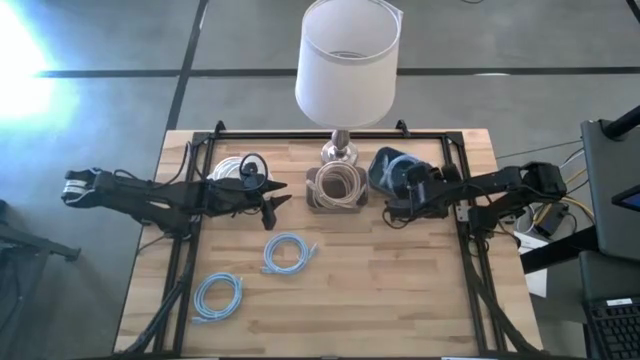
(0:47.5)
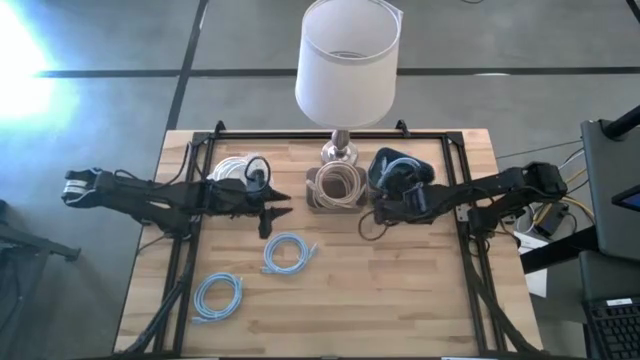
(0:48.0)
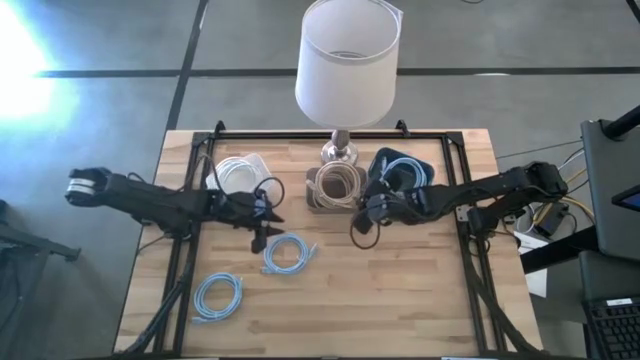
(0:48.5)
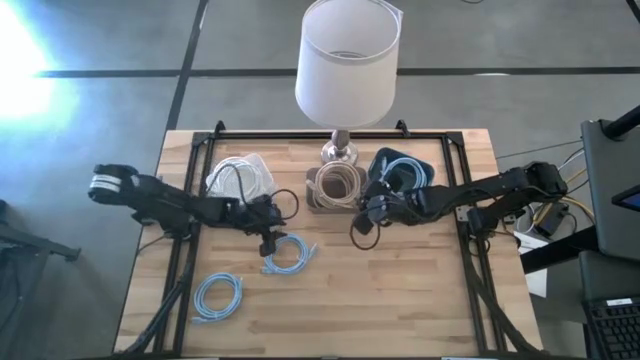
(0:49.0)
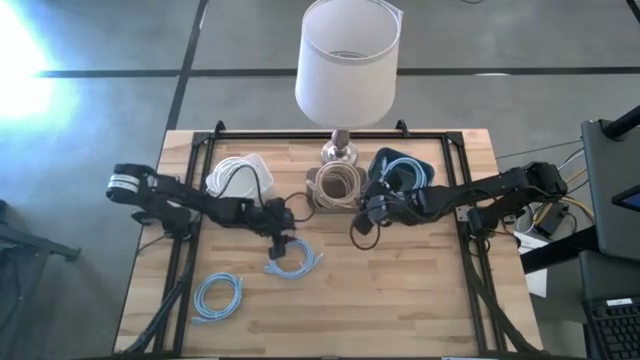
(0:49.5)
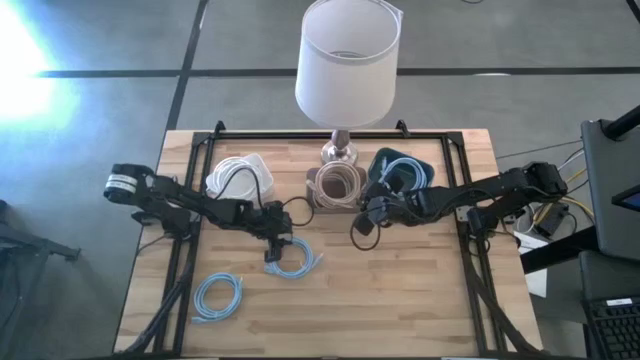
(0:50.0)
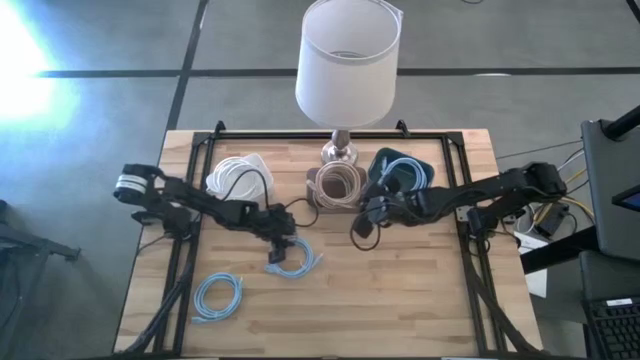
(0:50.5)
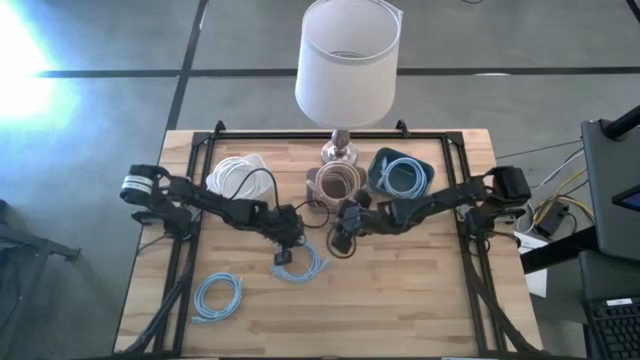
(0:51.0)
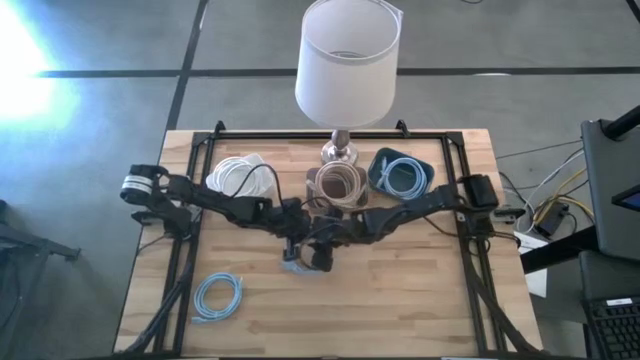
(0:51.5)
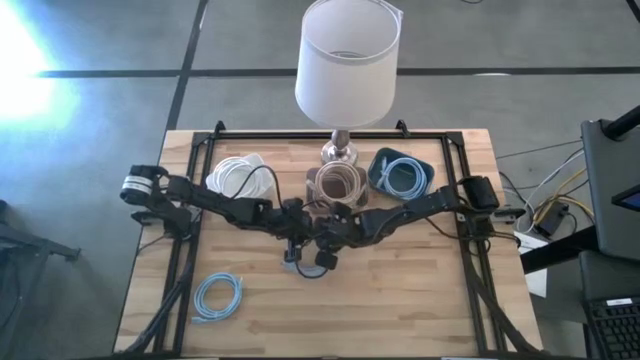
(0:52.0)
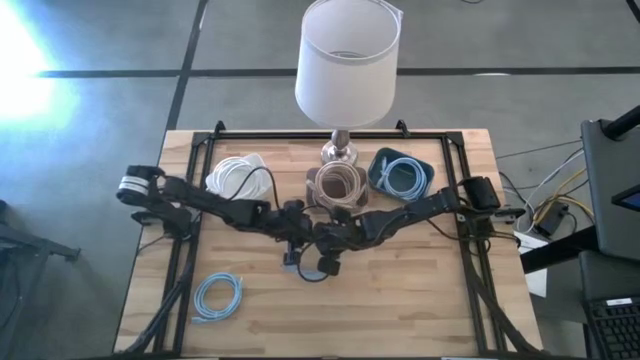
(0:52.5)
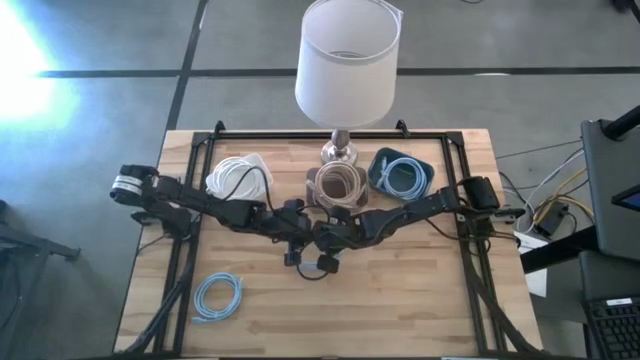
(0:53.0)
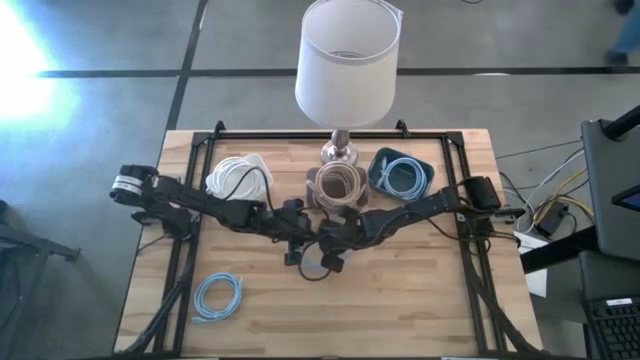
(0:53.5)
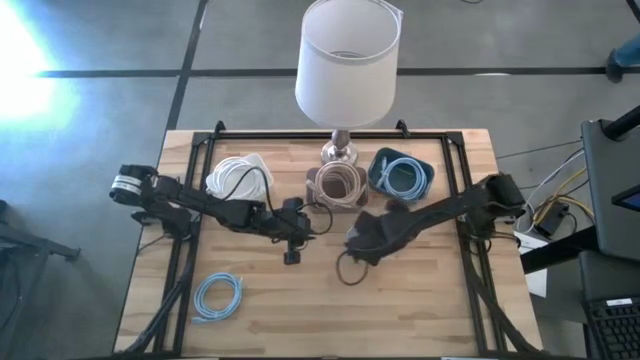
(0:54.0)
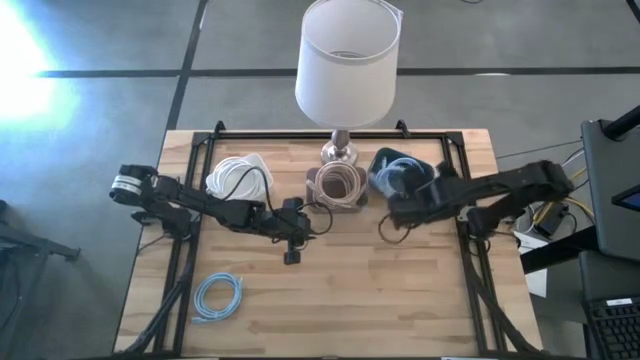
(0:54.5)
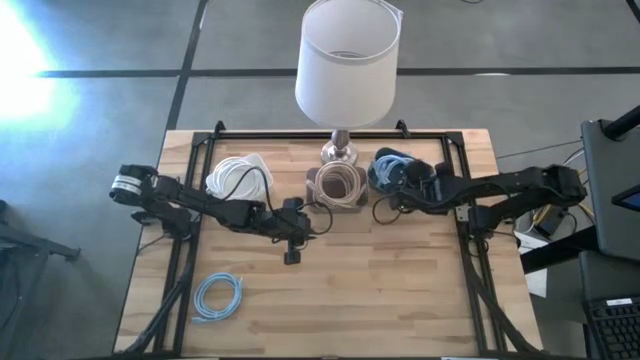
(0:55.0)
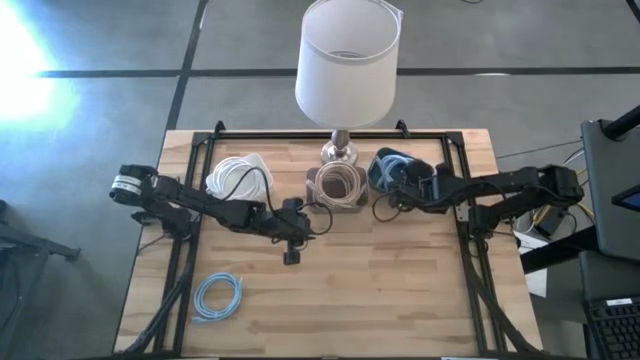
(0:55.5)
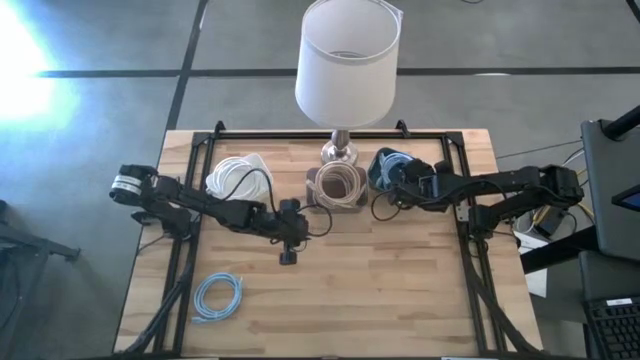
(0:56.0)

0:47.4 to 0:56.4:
Task: Sort HDMI cables
Put the top blue HDMI cable into the blue bin

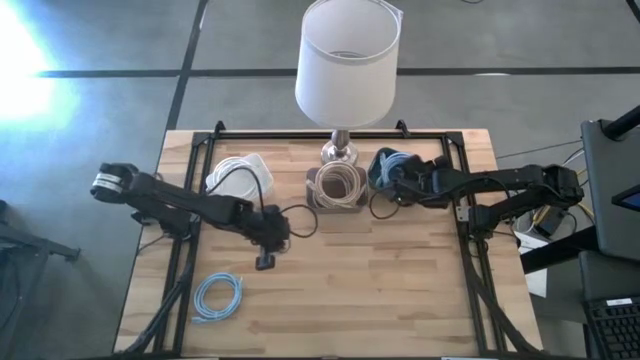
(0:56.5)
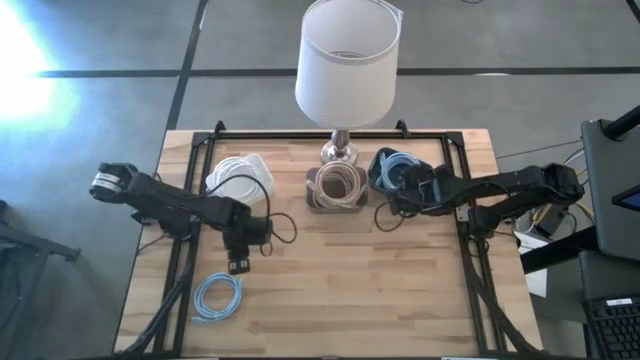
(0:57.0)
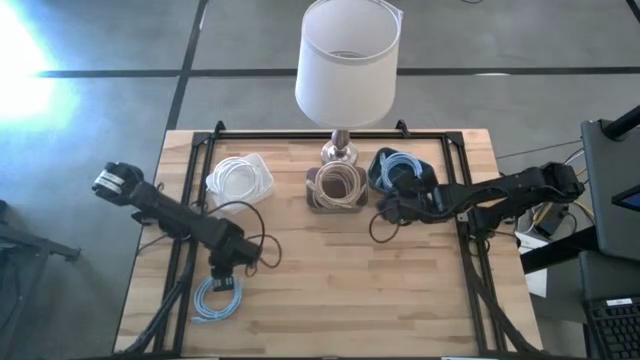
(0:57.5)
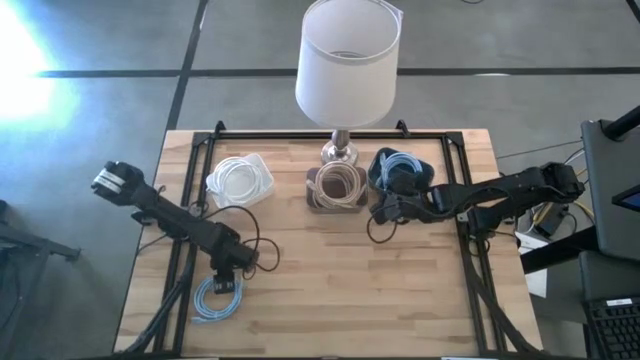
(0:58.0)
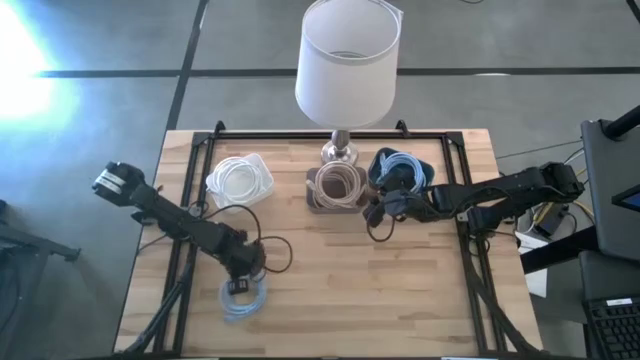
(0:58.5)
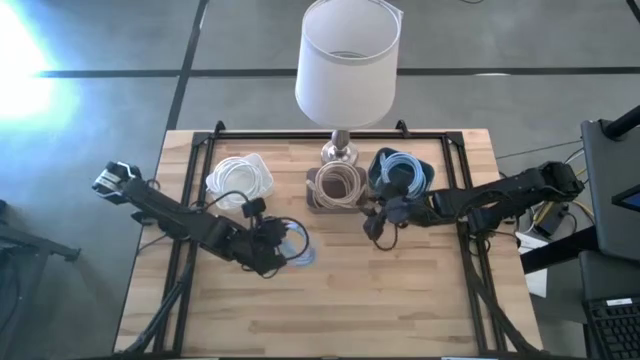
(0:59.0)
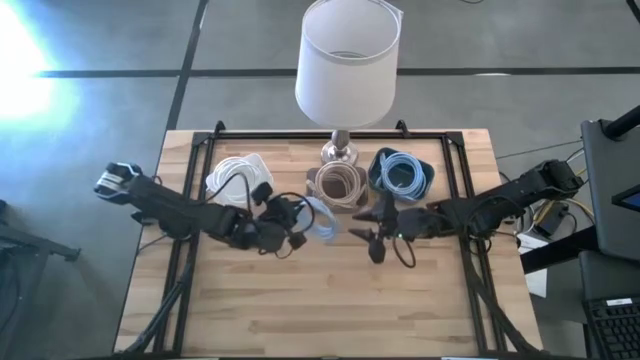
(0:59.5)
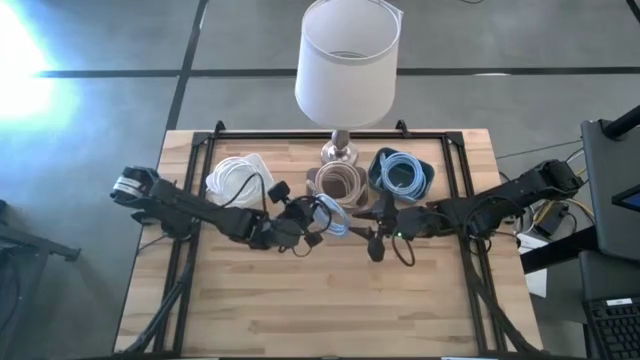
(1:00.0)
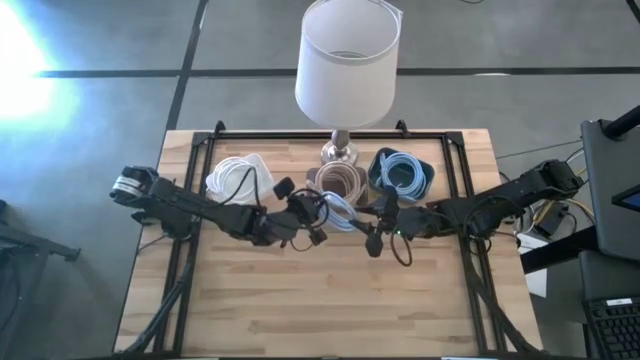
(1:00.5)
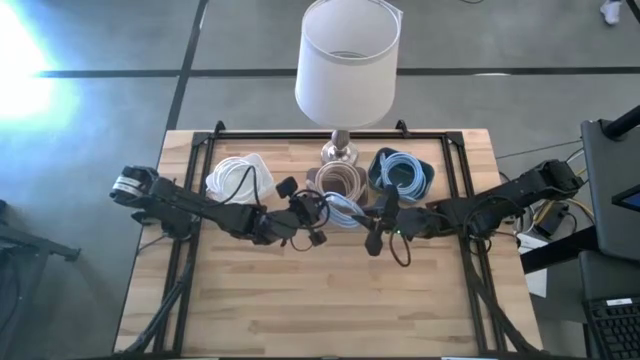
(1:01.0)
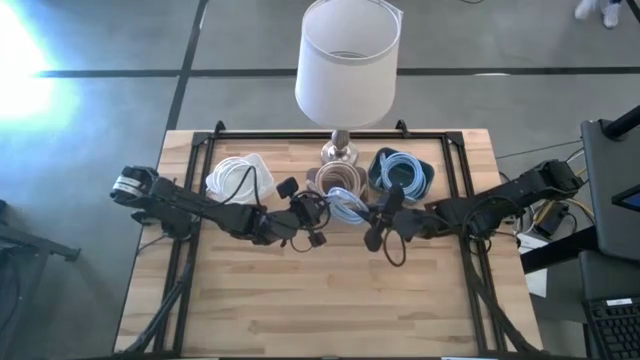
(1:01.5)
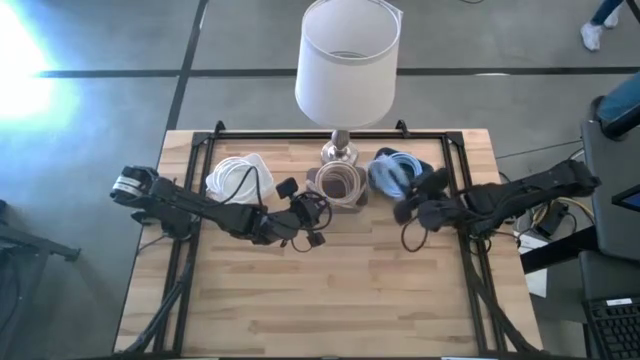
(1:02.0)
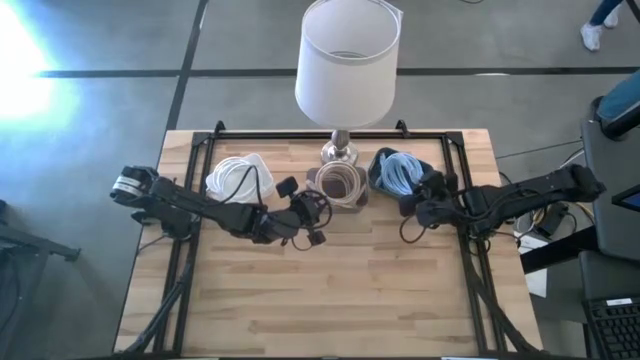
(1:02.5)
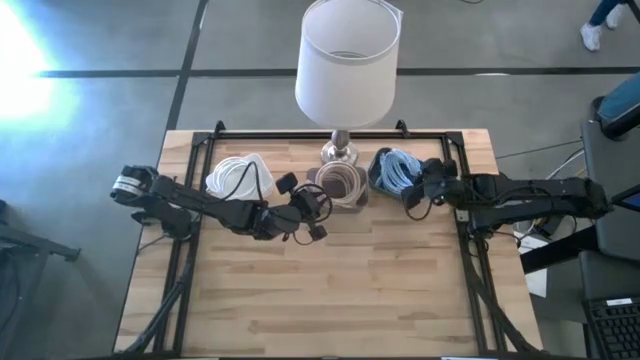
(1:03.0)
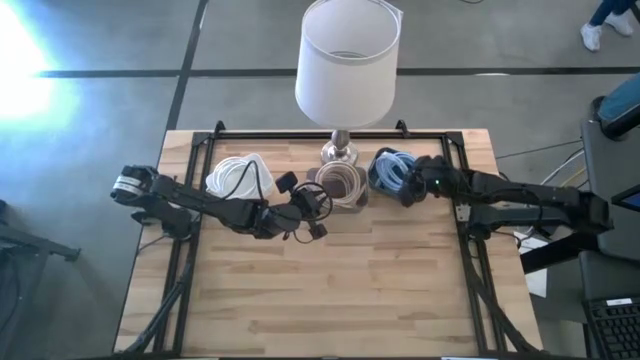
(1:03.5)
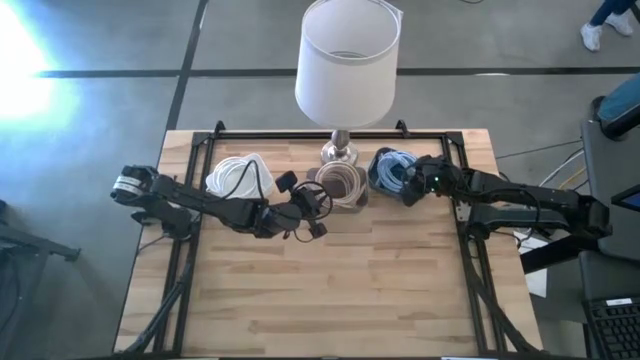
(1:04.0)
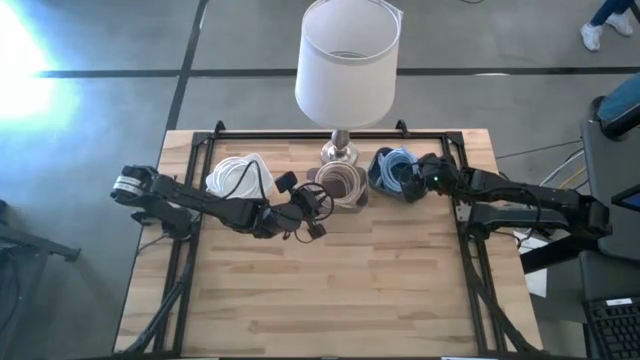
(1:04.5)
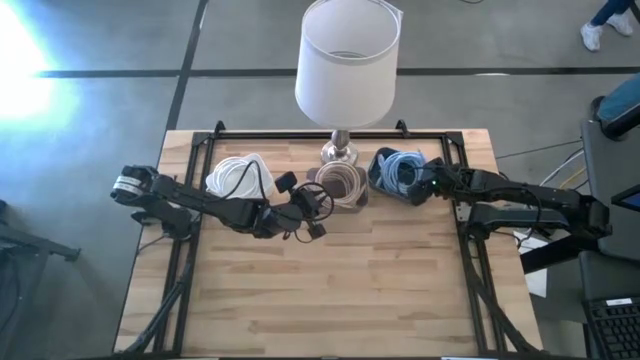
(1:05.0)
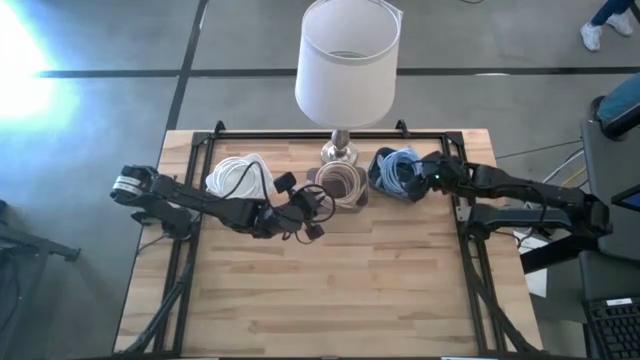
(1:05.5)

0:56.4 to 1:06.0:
Put the blue HDMI cable into the blue bin

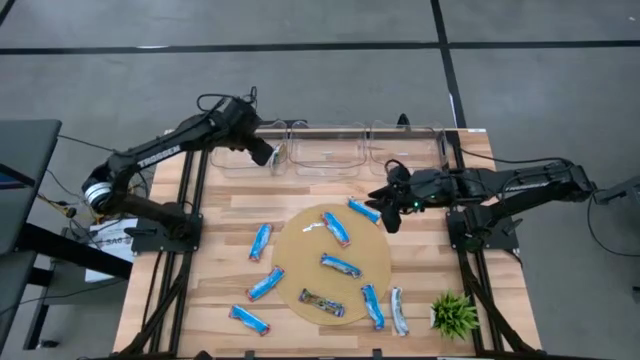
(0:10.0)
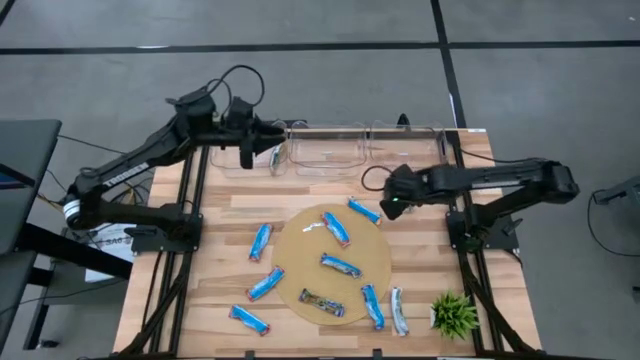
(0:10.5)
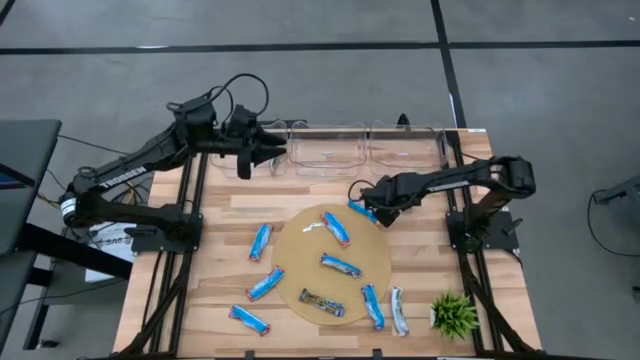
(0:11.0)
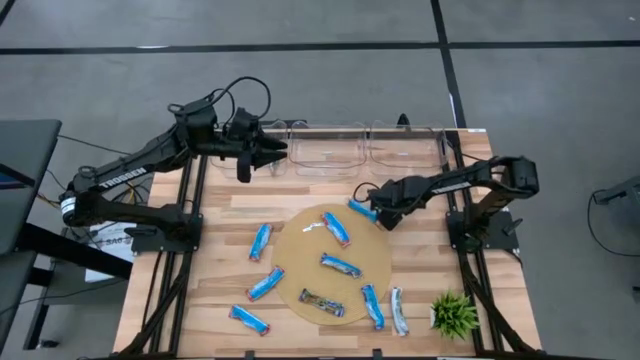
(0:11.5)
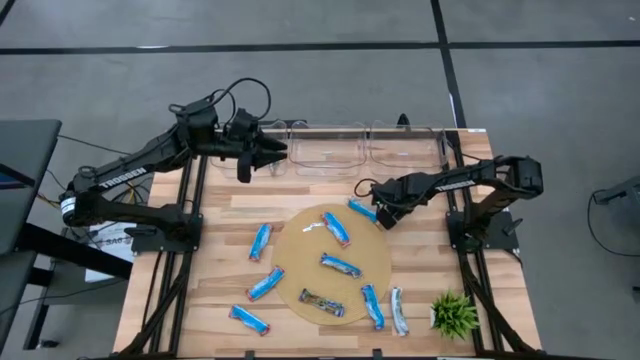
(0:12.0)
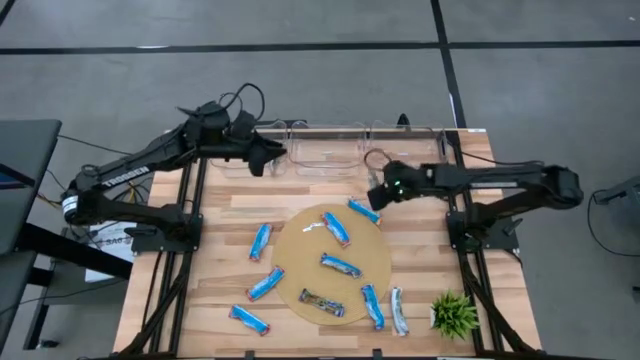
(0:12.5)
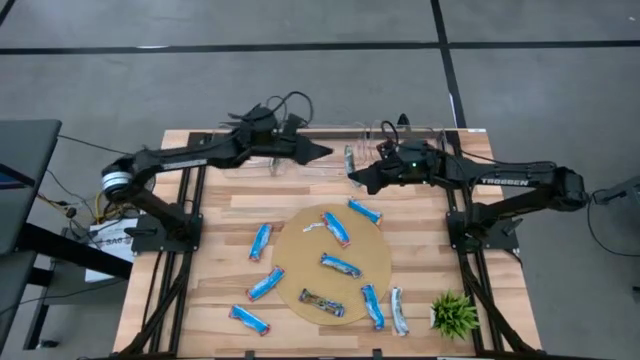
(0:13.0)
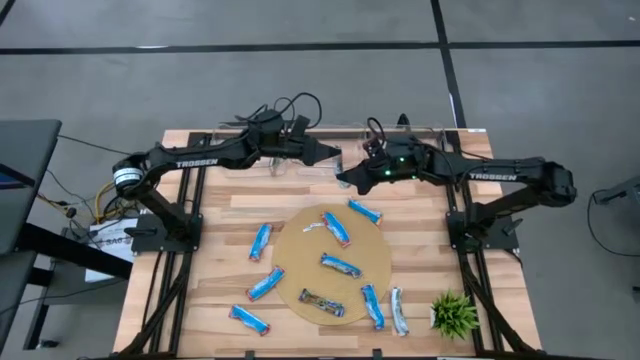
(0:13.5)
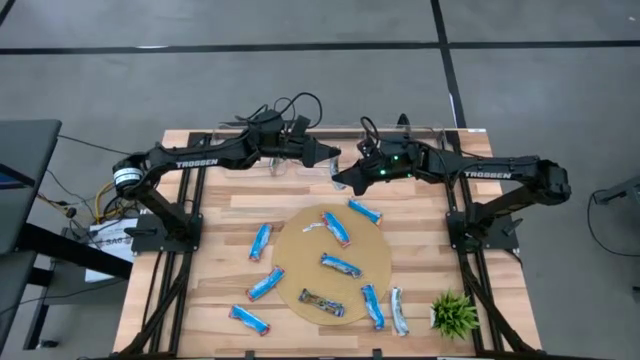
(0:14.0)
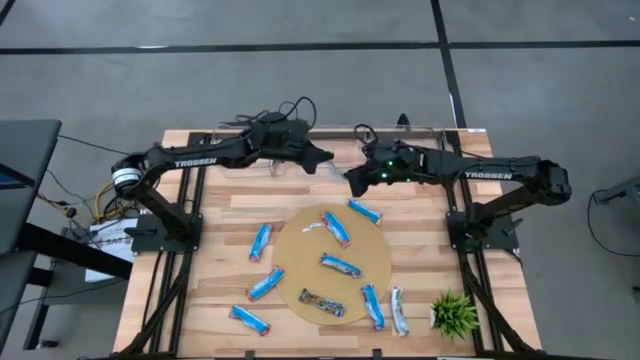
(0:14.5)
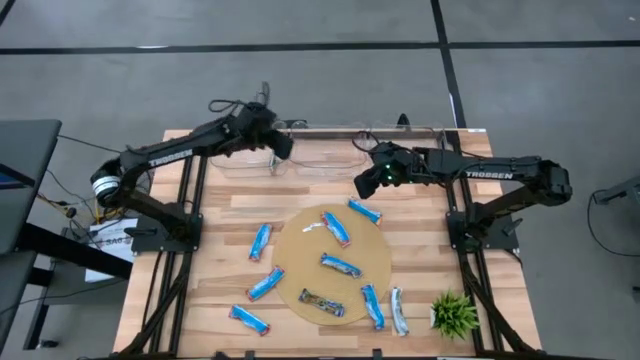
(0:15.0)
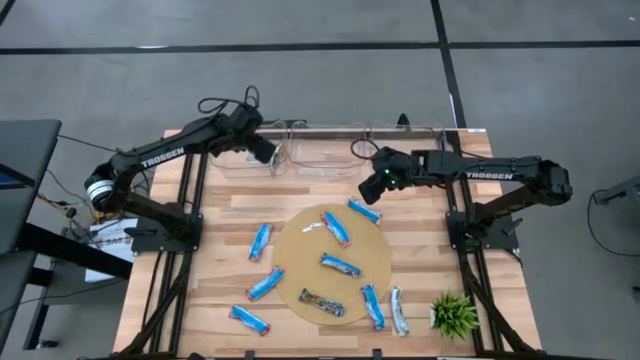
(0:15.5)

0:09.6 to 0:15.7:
Task: Pick and place Granola Bars by type
Put the yellow granola bar into the top left transparent bin
